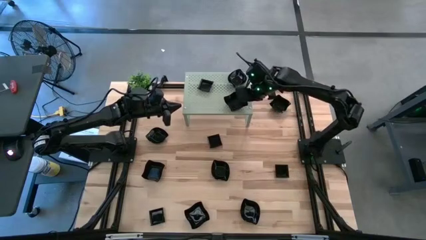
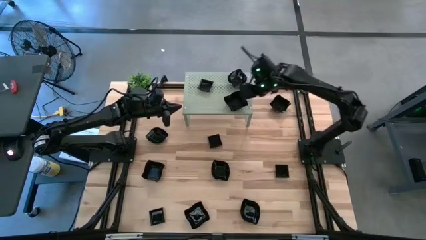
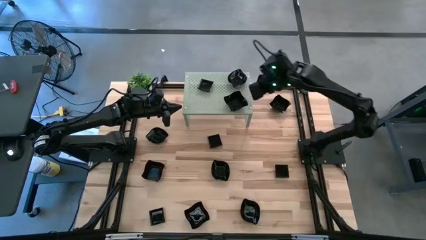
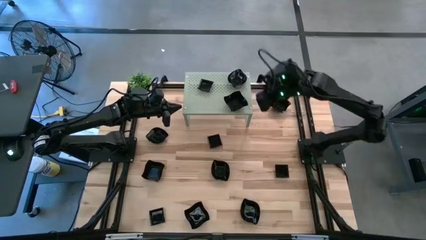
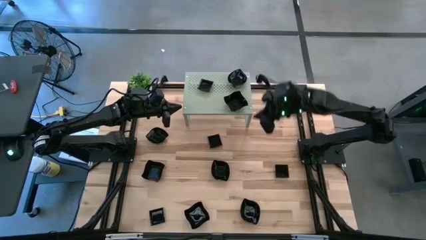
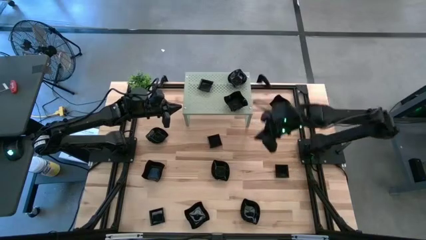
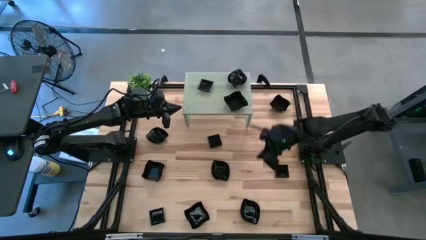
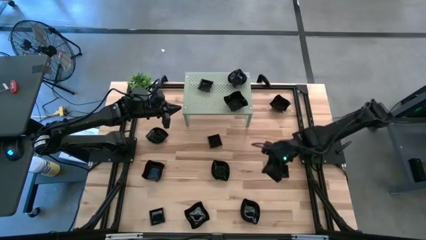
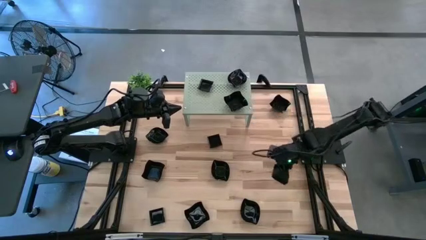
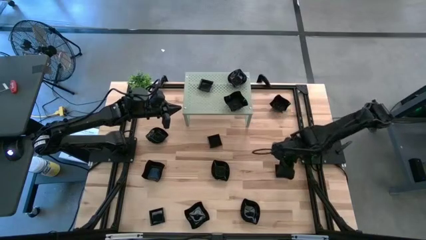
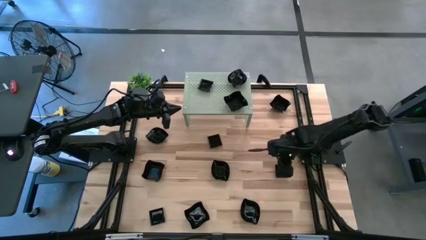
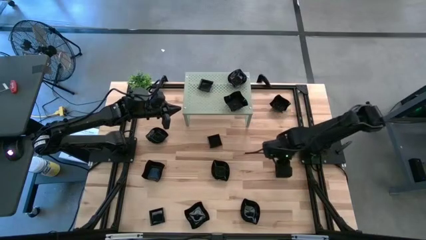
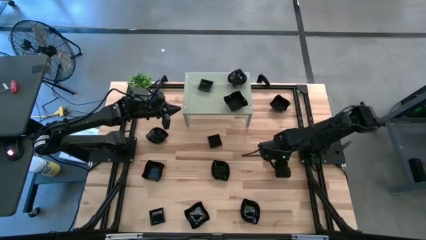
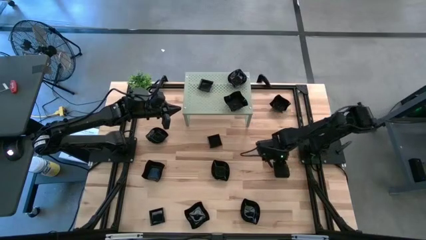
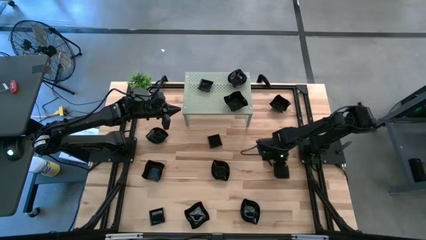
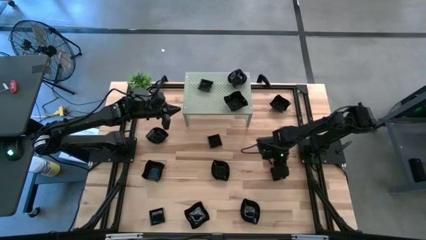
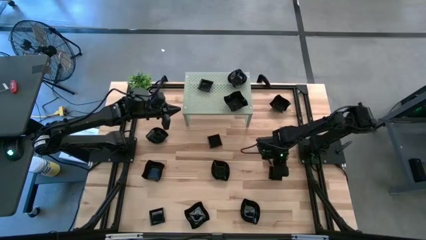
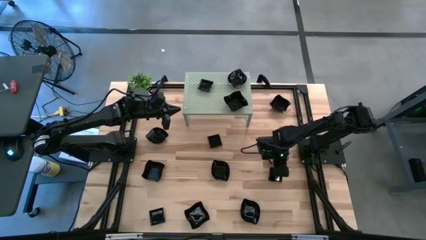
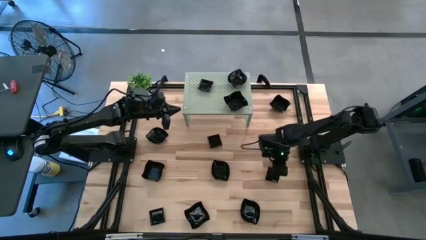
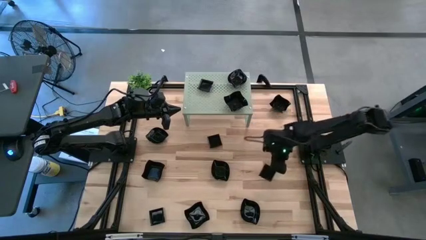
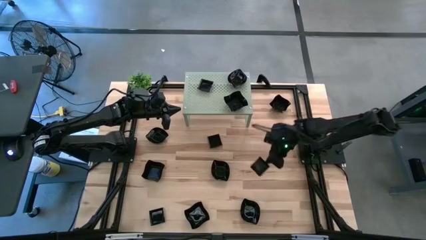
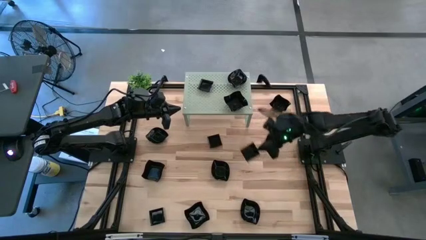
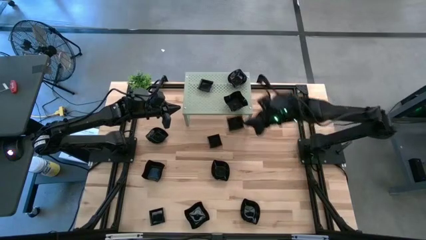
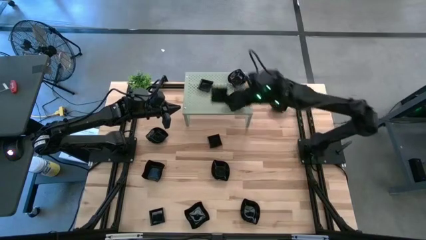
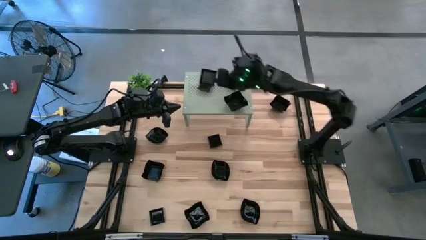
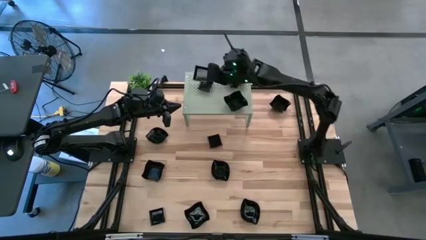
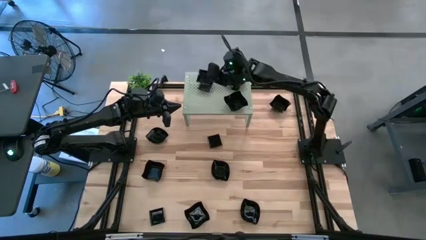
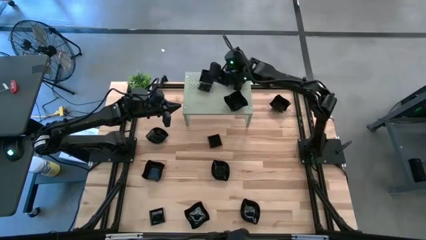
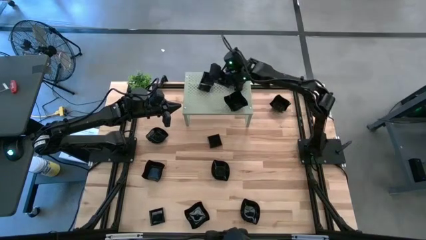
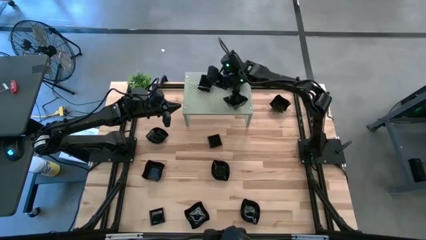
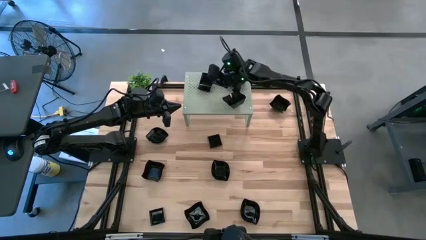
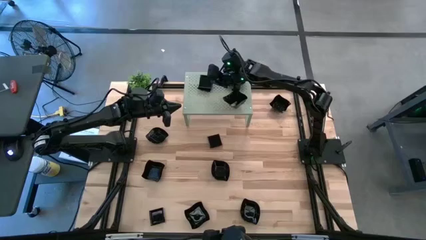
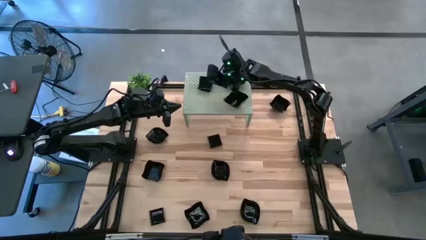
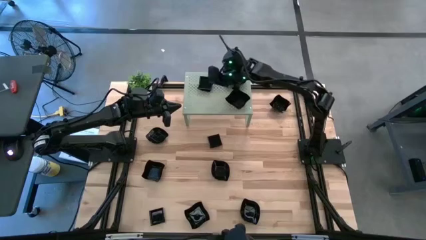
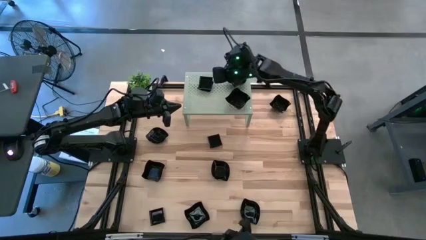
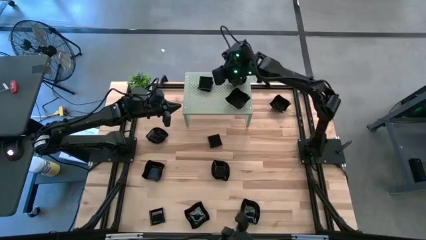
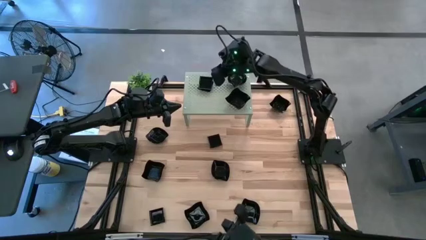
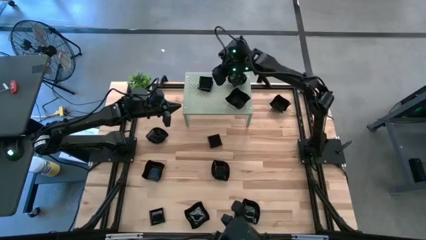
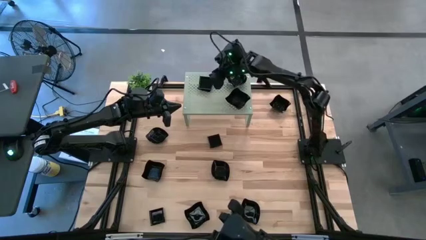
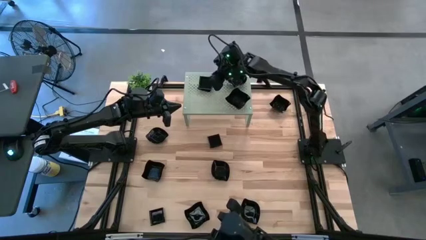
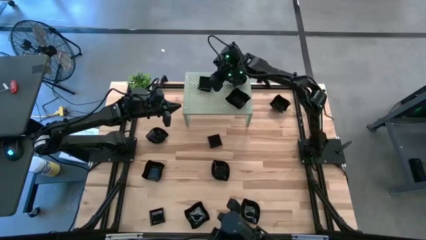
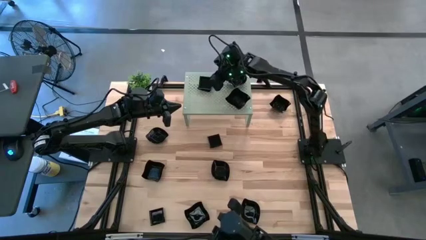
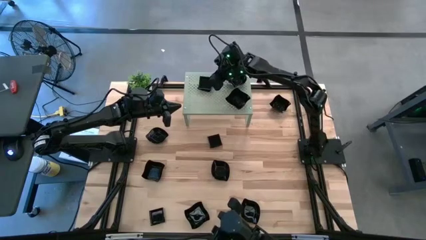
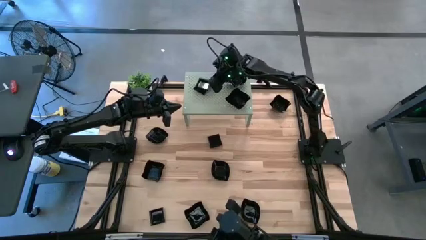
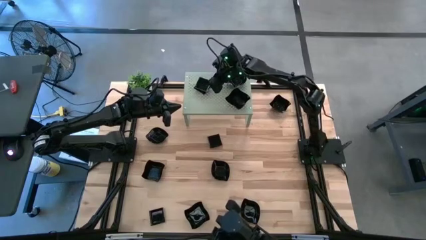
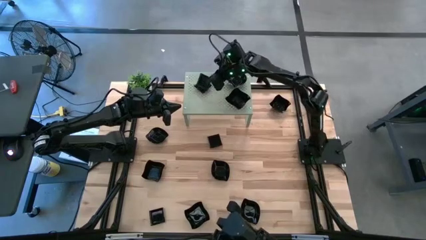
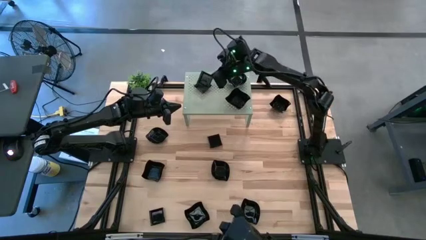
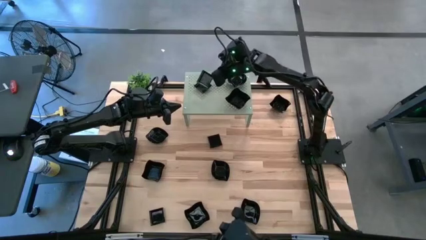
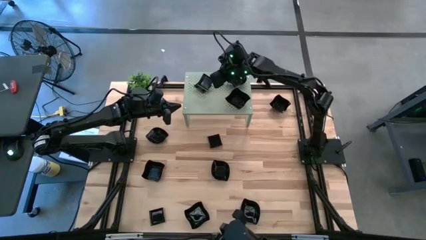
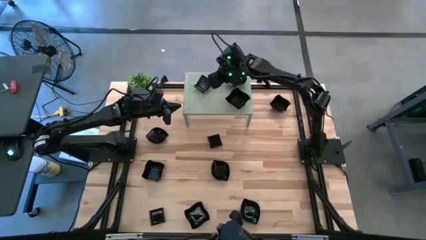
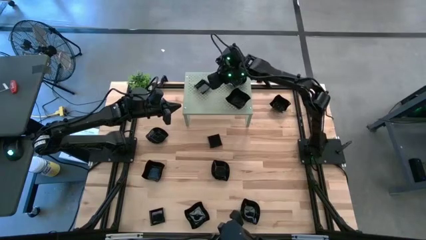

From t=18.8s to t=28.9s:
Task: Pick & Place Mini shaped plates
Stack the black square plate on top of the black square plate on the shelf

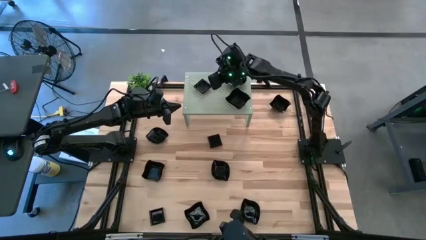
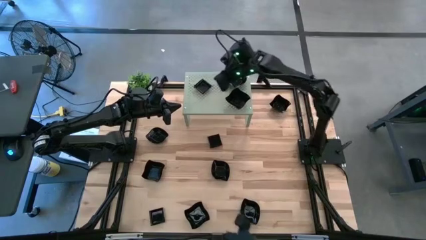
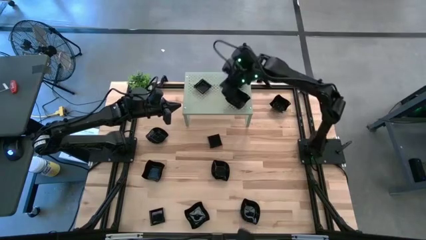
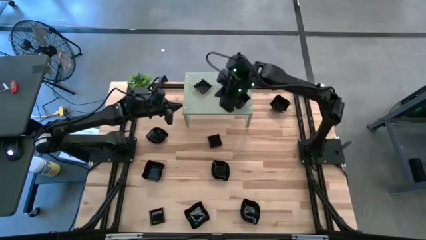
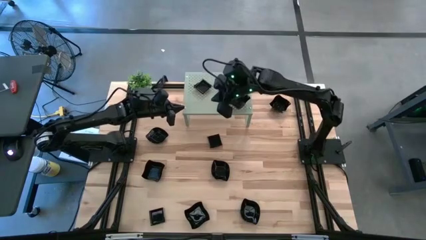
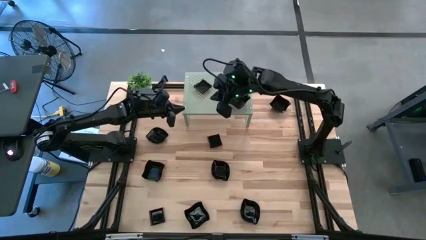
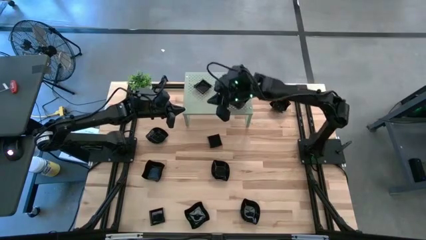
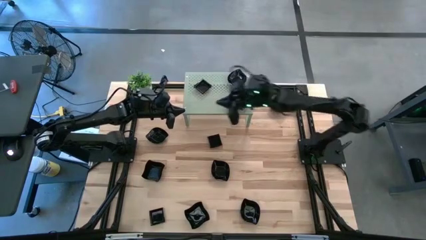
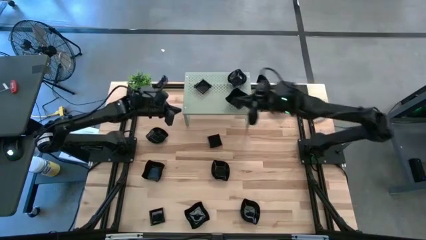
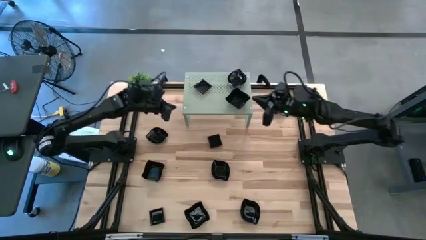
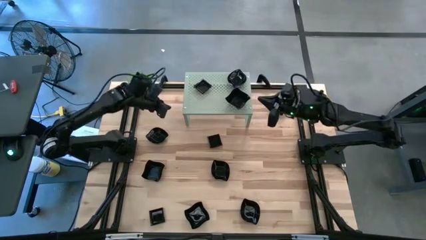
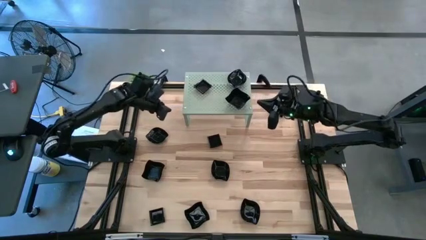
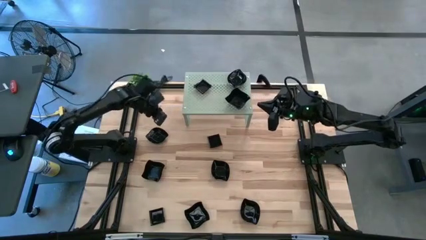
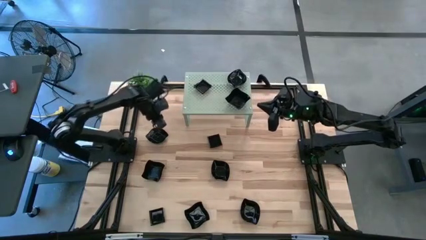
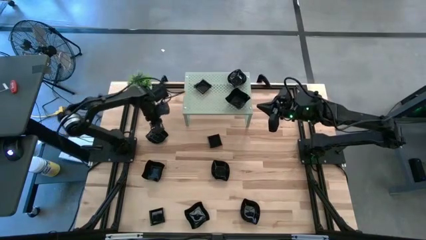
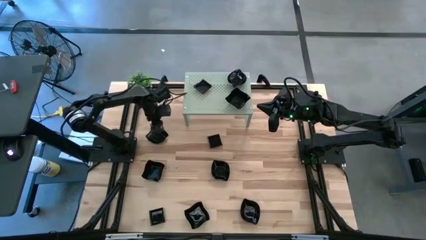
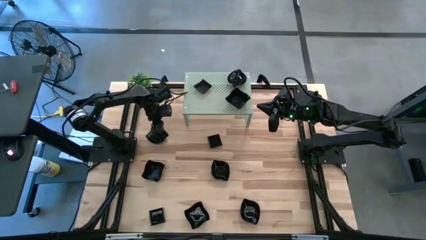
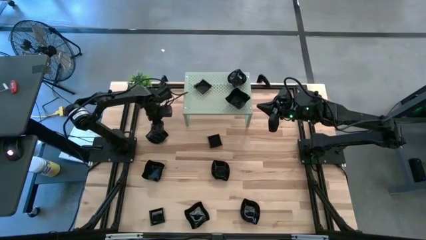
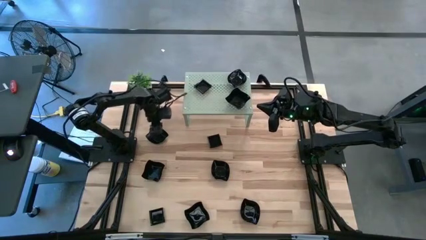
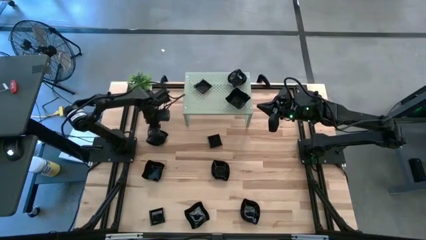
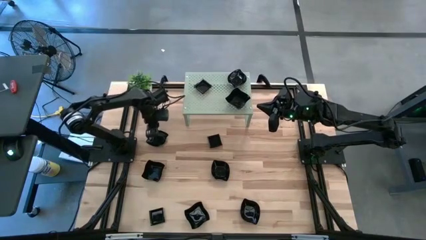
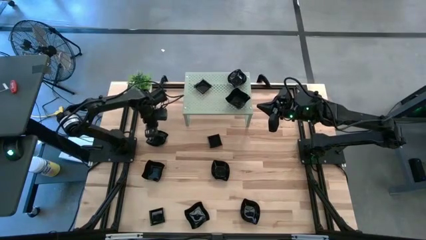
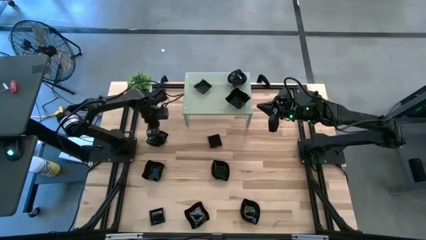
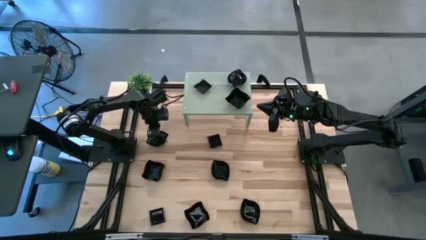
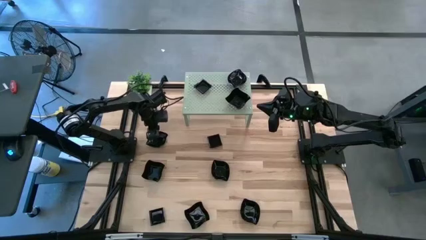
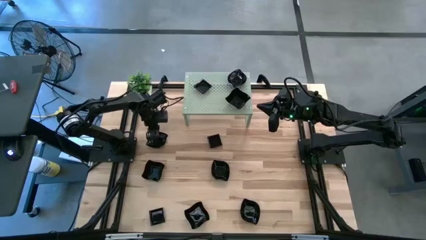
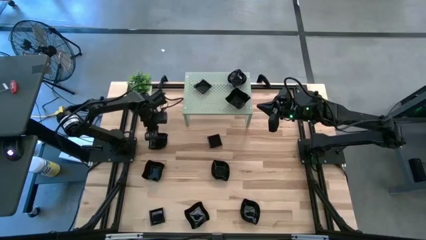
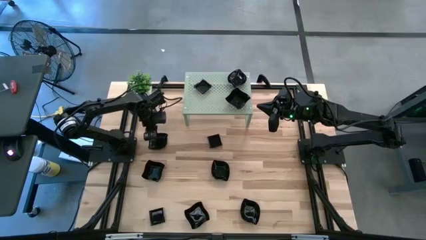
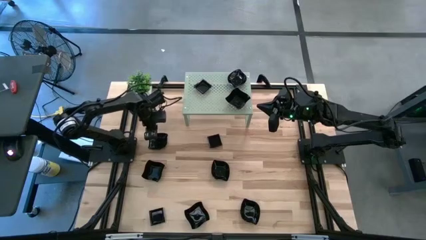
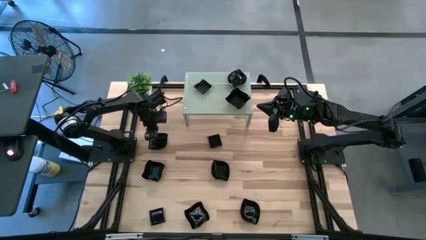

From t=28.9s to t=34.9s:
Stack the black leaf-shaped plate on top of the black leaf-shaped plate on the shelf
